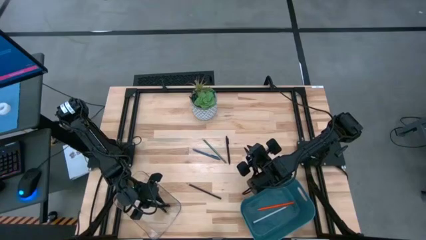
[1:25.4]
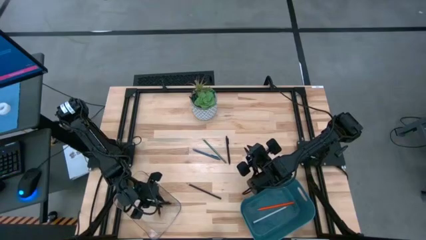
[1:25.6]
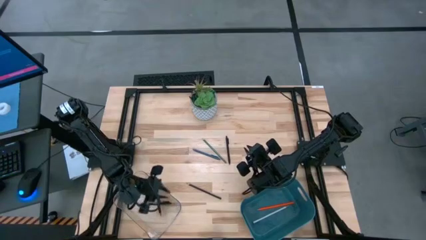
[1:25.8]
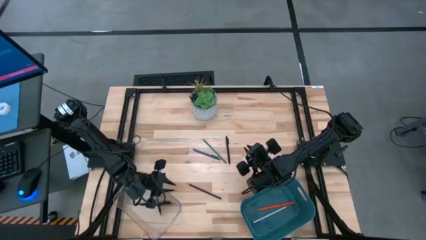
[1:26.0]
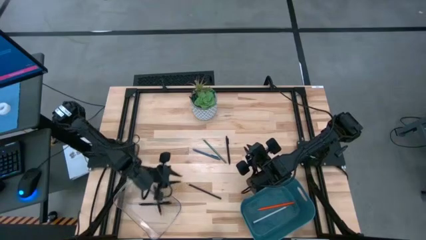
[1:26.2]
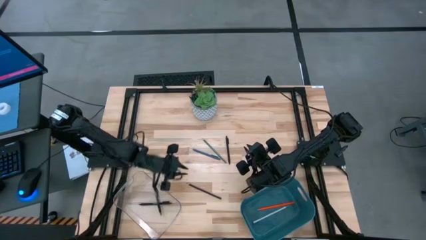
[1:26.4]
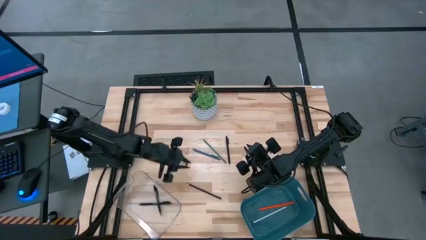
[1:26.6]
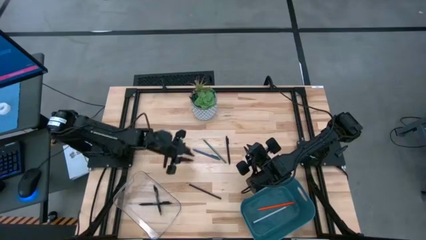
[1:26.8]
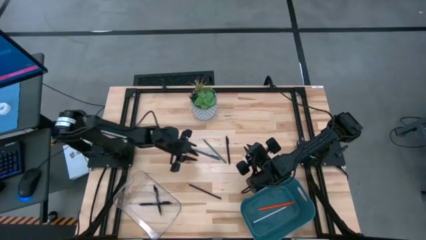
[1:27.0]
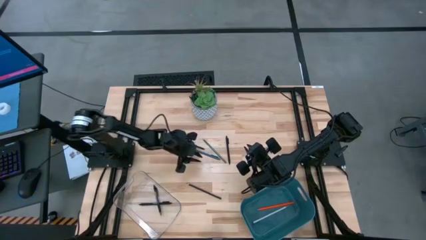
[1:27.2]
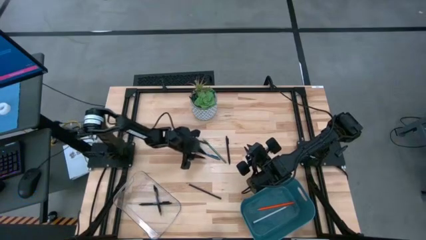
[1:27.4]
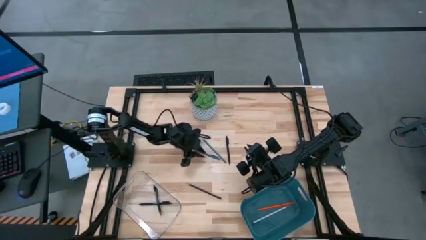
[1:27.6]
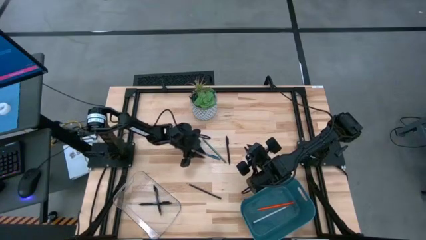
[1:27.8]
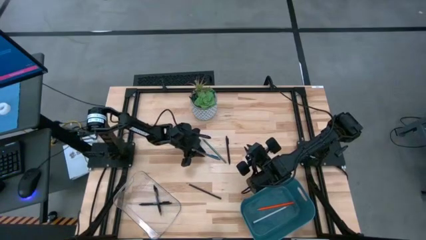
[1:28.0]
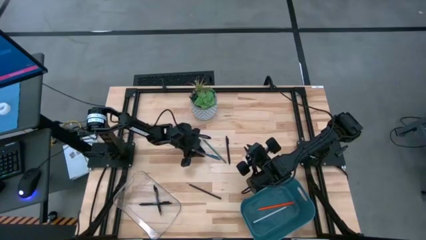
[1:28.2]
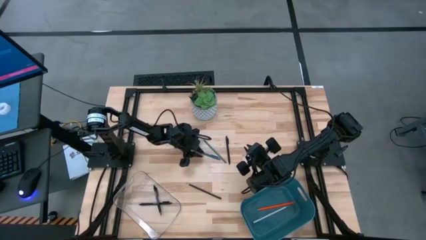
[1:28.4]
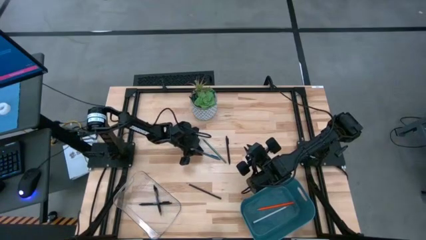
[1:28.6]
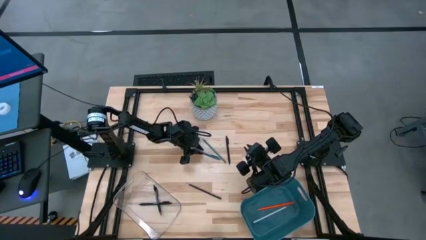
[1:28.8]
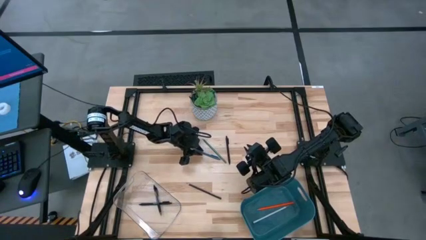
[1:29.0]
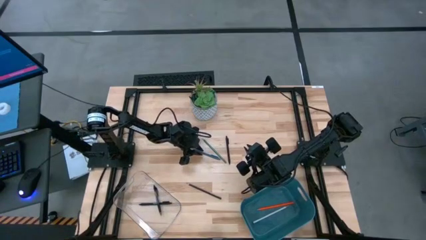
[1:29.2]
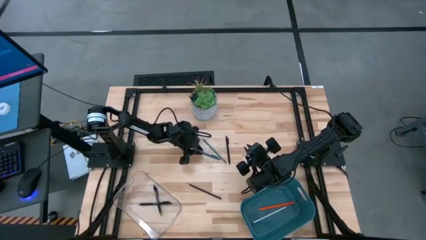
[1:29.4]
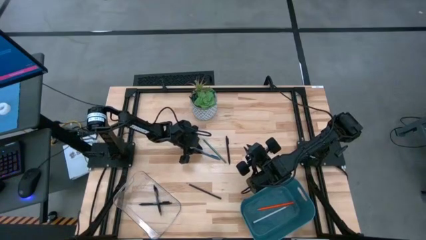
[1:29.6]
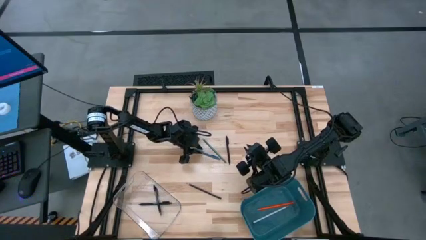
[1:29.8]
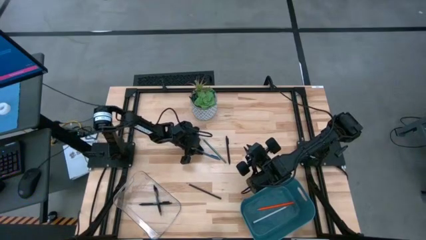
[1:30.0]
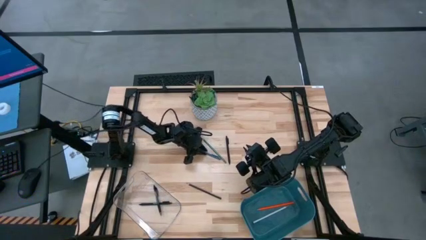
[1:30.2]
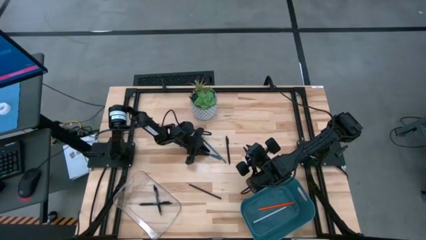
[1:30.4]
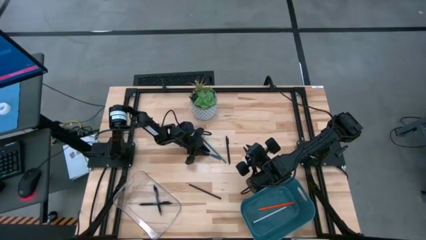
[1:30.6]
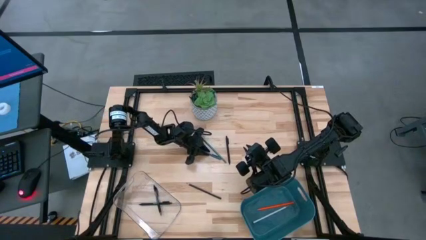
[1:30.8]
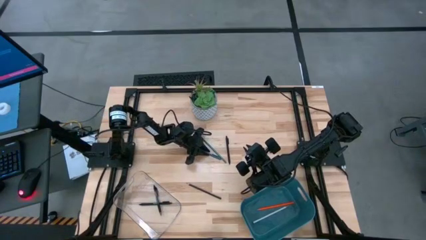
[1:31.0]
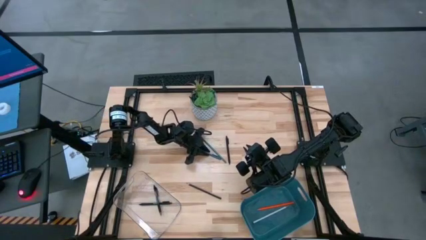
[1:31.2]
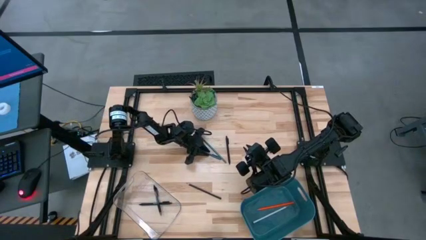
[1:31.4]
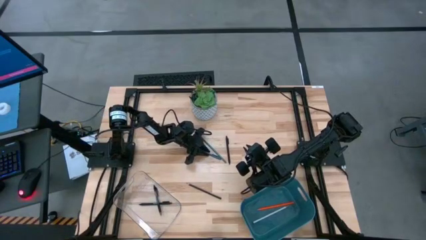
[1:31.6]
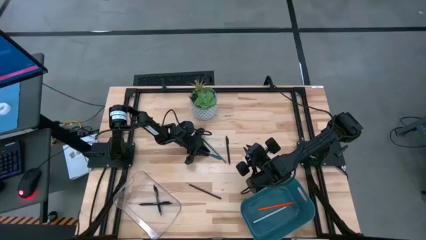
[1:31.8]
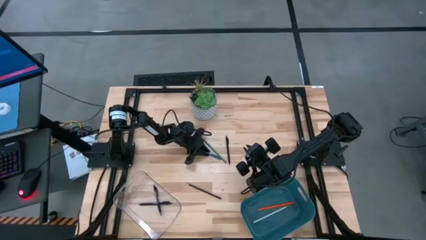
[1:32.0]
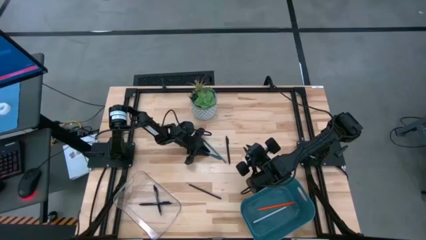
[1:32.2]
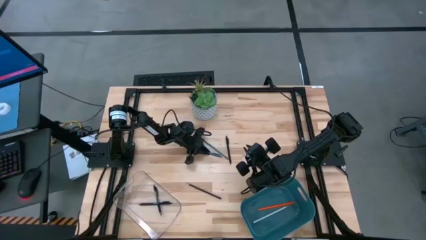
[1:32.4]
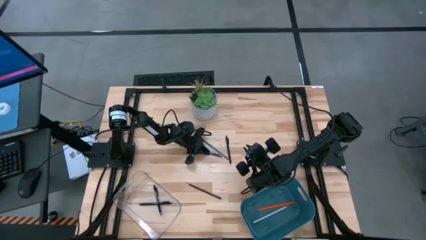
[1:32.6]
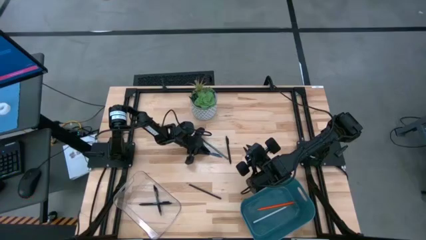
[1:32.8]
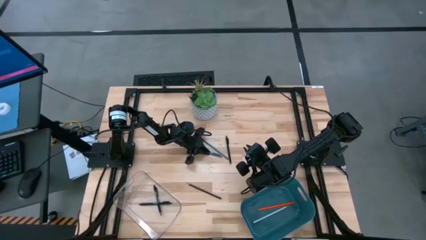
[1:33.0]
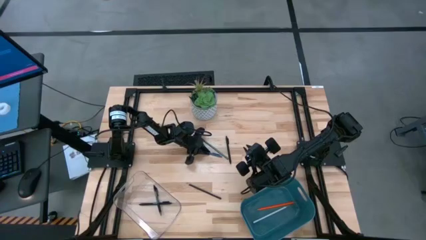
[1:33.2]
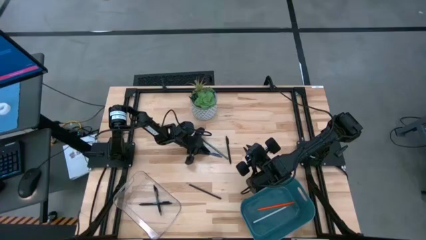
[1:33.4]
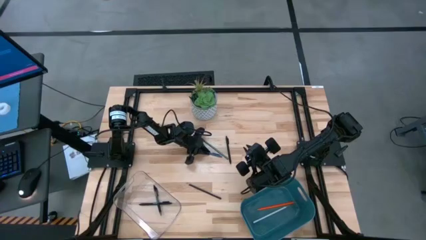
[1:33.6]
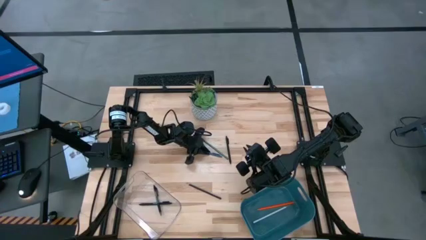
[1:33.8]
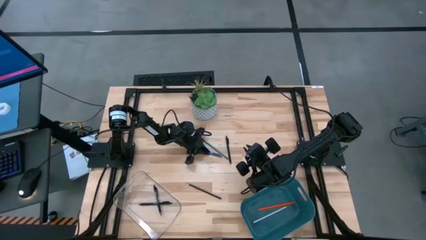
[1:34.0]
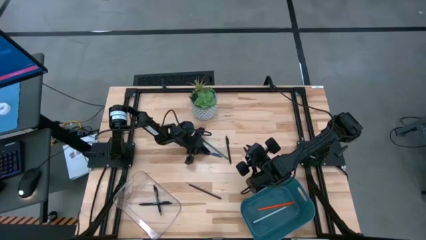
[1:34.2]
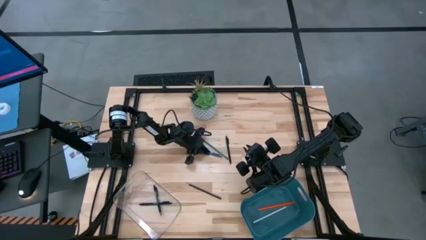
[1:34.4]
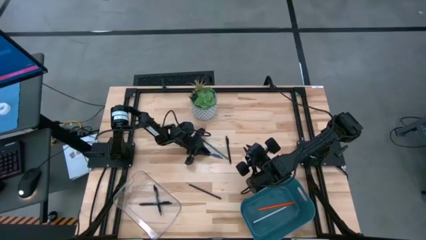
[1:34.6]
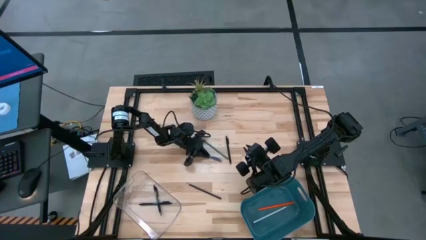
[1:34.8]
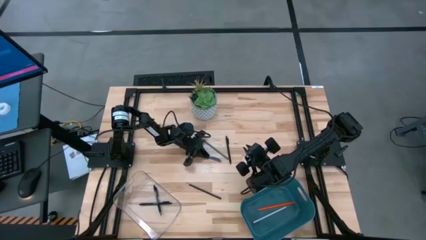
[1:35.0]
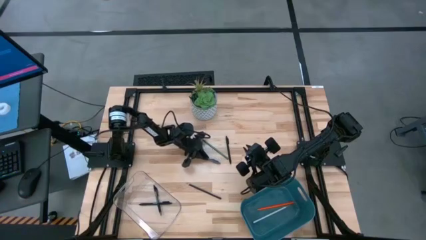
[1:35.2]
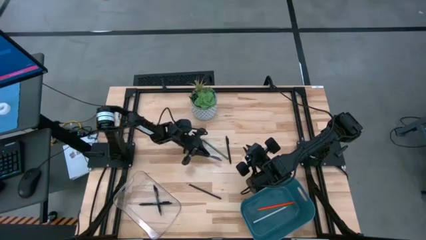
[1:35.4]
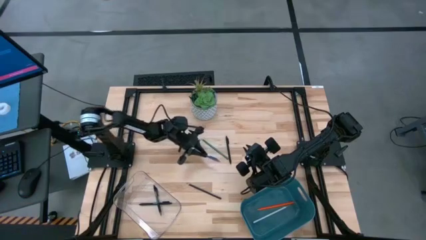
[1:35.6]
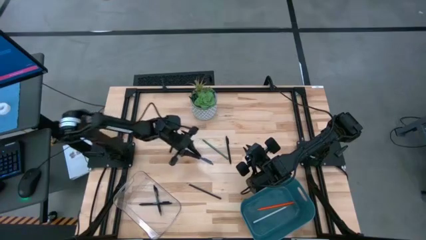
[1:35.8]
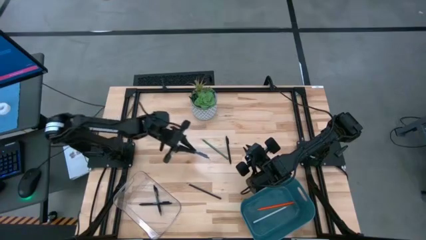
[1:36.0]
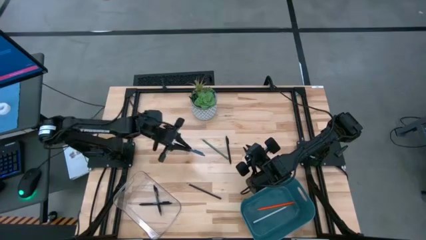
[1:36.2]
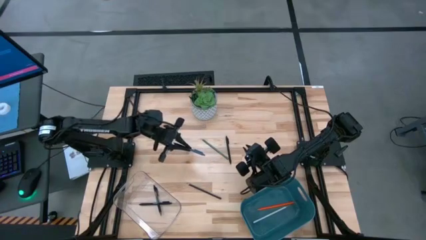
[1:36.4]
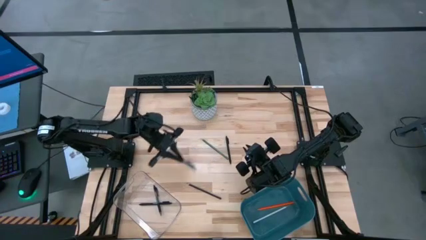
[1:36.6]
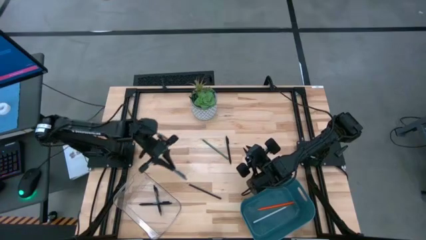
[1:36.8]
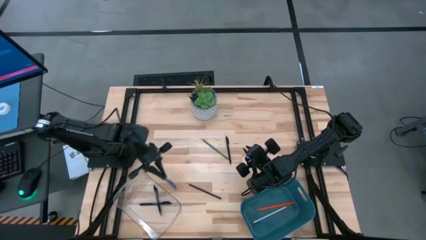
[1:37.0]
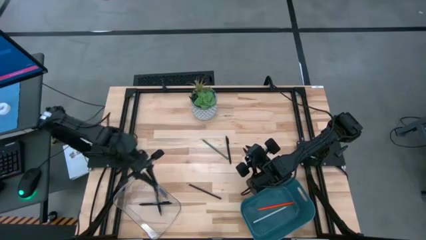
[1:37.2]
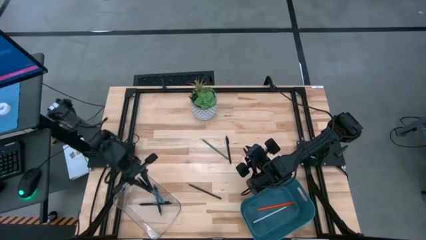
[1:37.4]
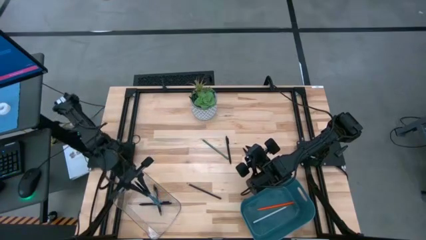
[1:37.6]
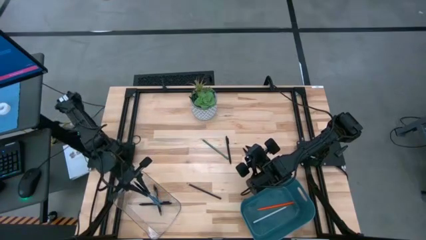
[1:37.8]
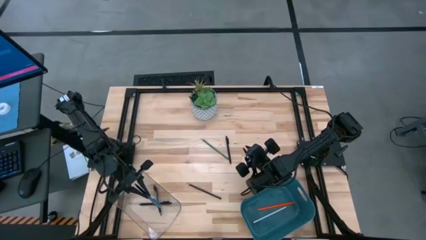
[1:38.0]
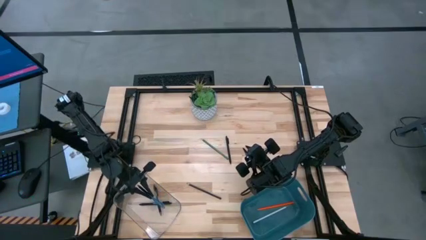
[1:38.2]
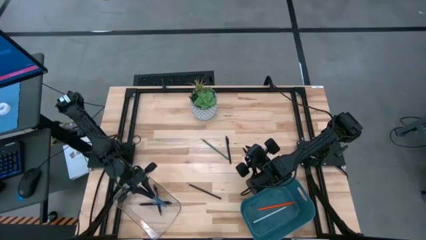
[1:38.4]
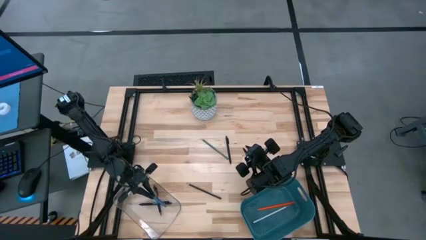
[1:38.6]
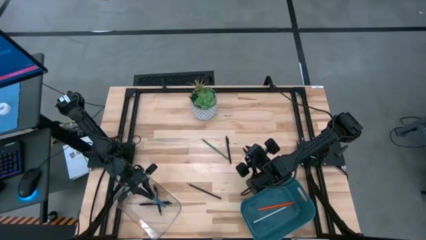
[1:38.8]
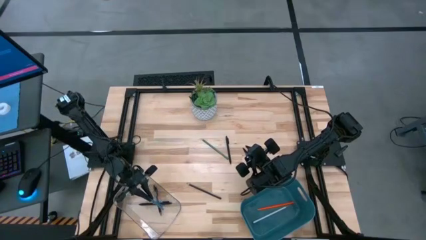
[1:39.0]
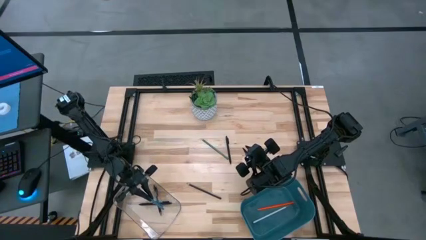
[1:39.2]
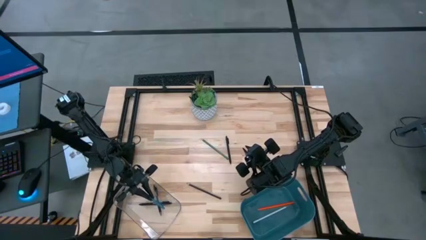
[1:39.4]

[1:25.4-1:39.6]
Task: Sort pens & pencils
Put the blue pen into the transparent bin
